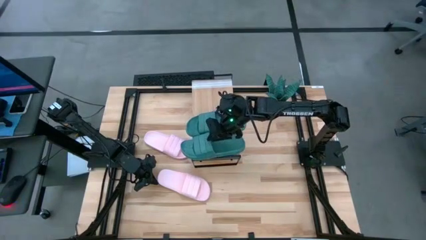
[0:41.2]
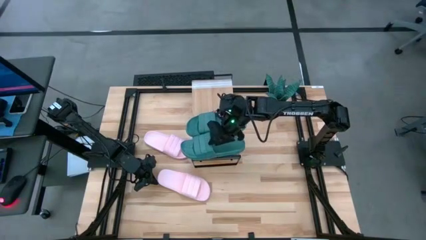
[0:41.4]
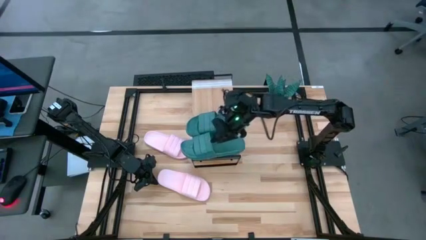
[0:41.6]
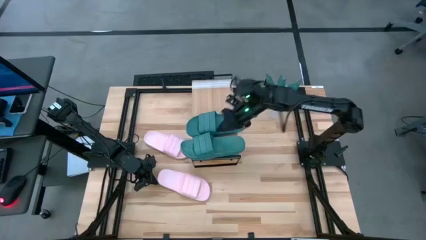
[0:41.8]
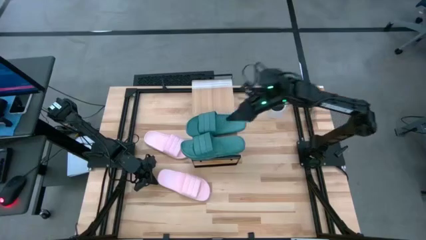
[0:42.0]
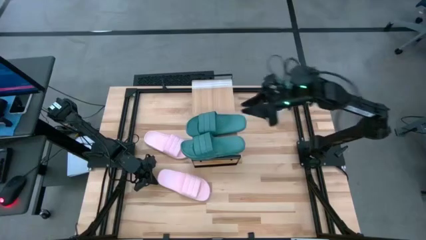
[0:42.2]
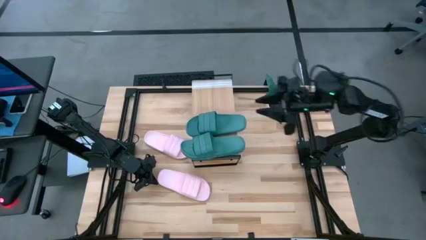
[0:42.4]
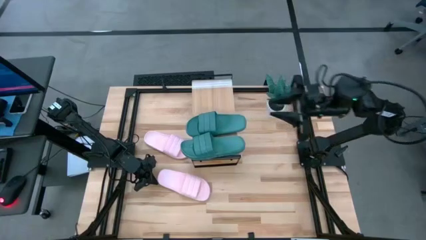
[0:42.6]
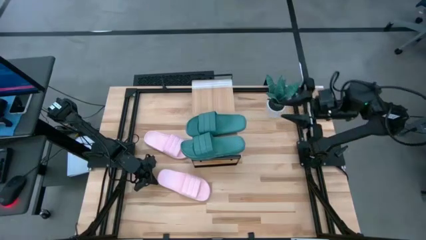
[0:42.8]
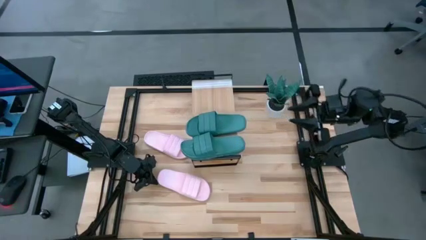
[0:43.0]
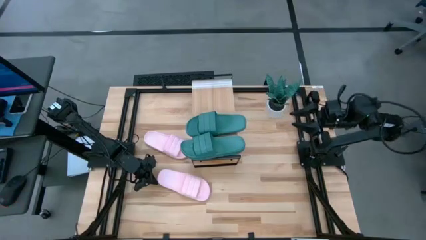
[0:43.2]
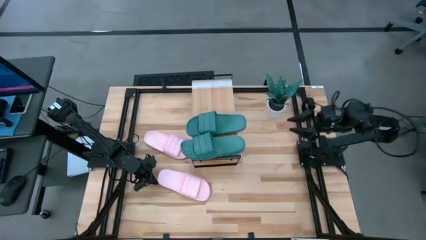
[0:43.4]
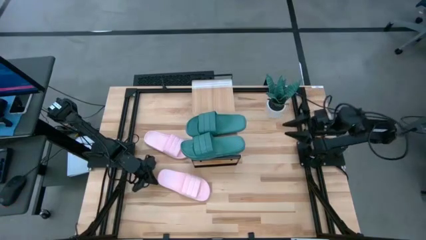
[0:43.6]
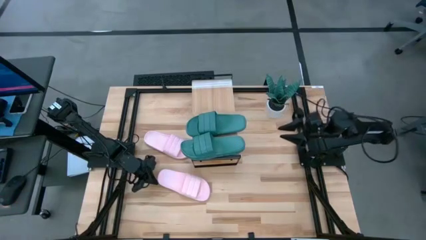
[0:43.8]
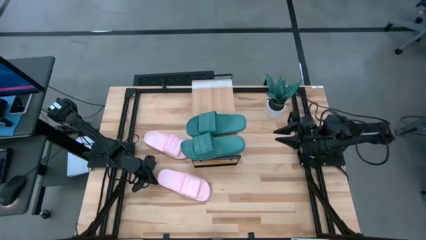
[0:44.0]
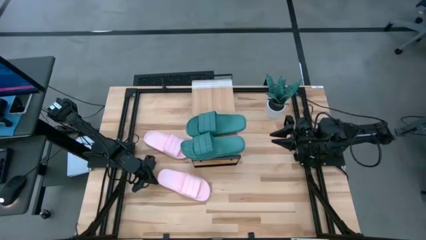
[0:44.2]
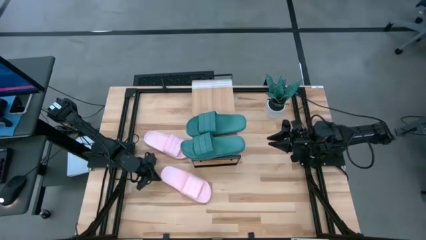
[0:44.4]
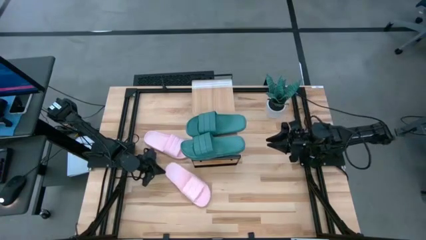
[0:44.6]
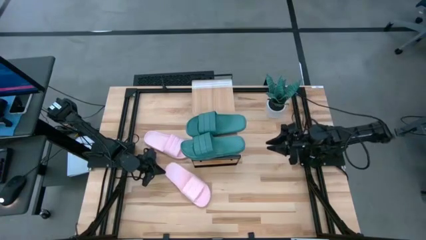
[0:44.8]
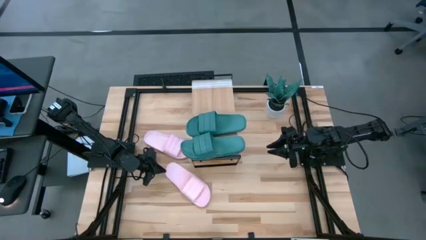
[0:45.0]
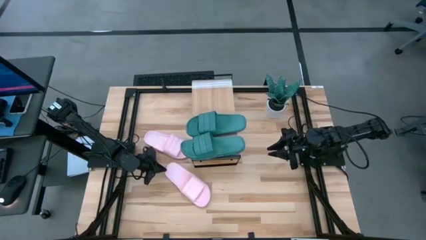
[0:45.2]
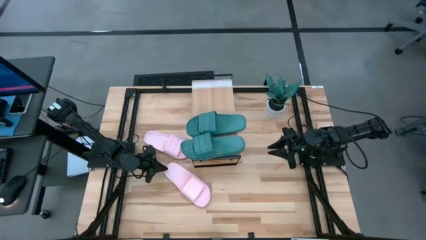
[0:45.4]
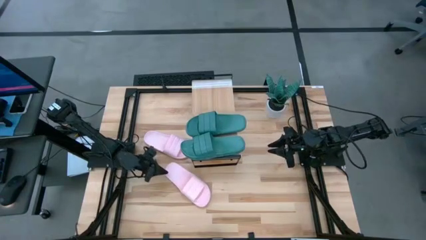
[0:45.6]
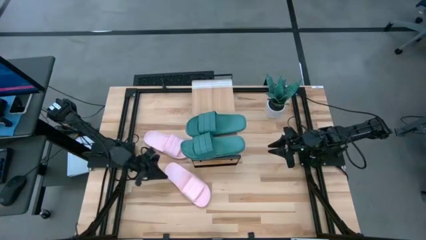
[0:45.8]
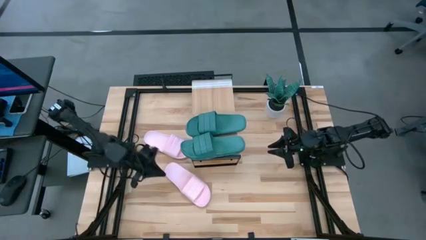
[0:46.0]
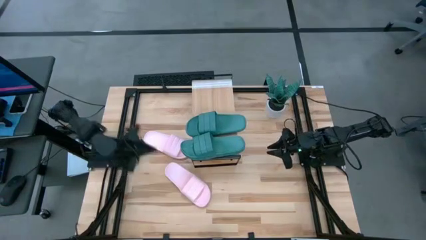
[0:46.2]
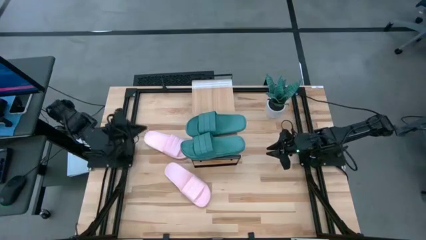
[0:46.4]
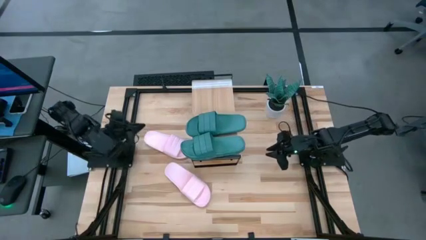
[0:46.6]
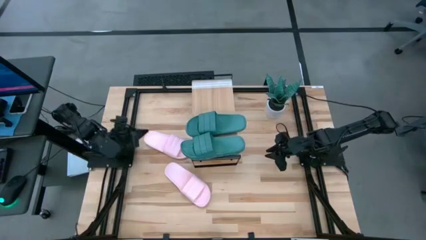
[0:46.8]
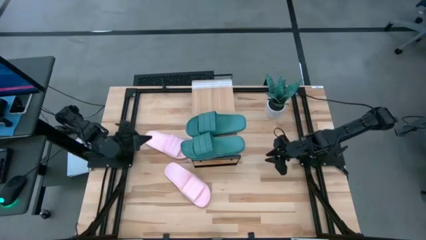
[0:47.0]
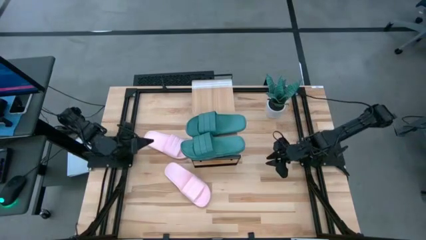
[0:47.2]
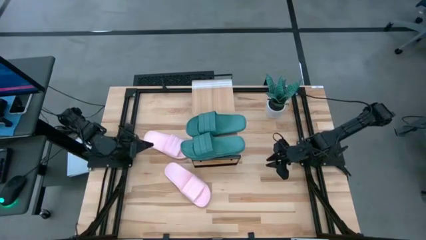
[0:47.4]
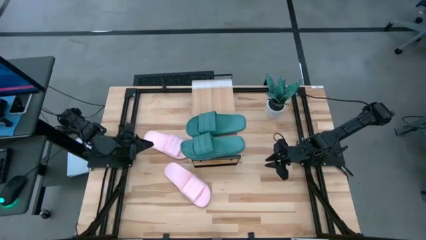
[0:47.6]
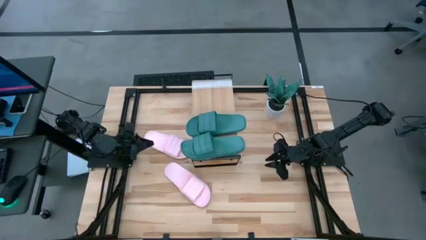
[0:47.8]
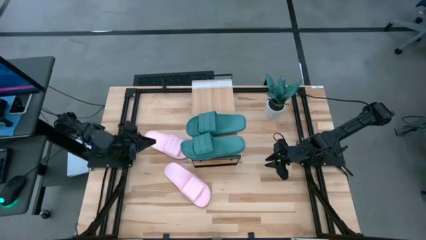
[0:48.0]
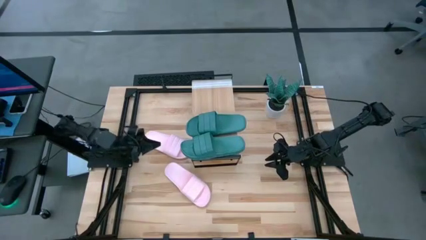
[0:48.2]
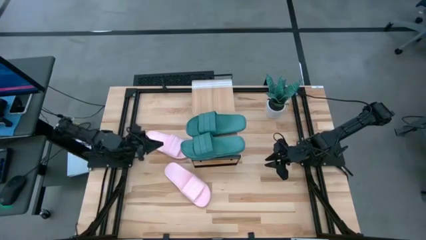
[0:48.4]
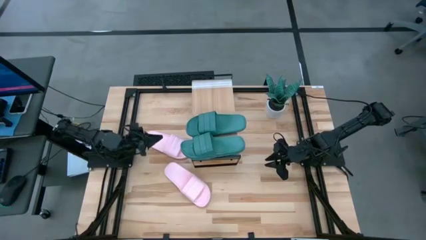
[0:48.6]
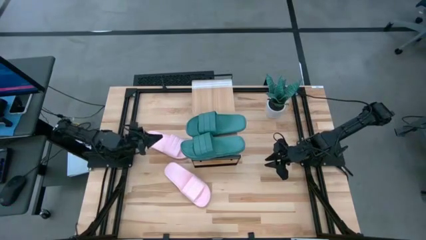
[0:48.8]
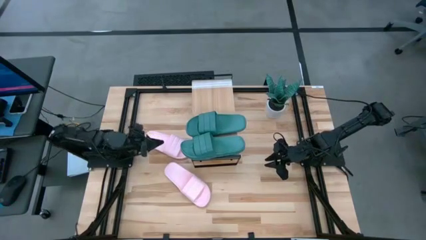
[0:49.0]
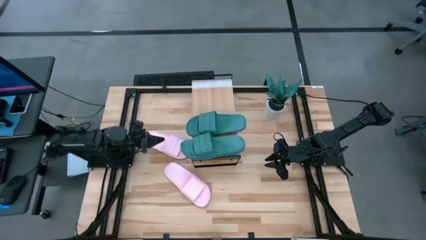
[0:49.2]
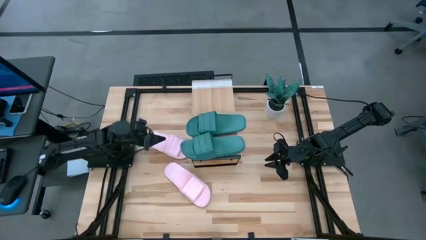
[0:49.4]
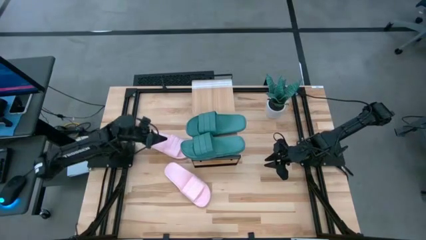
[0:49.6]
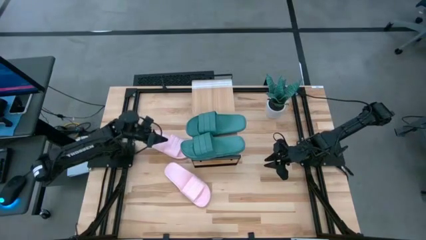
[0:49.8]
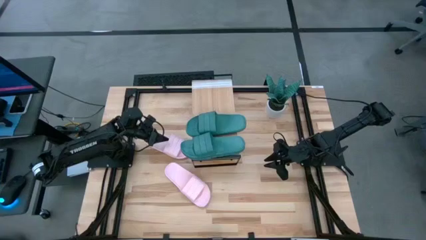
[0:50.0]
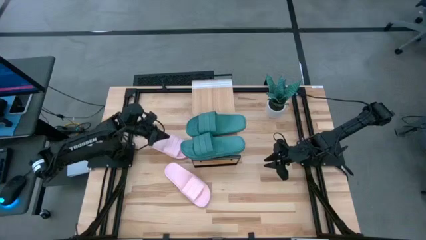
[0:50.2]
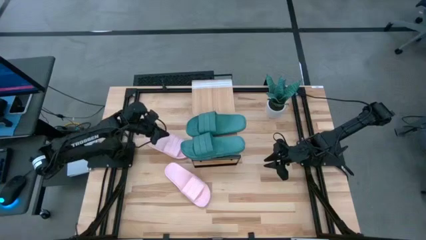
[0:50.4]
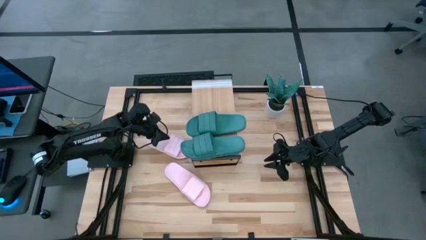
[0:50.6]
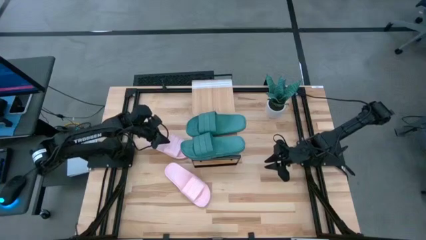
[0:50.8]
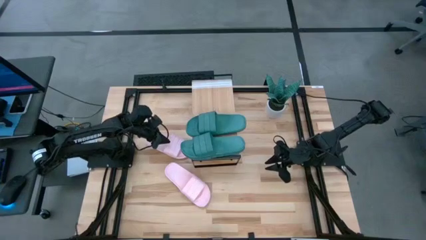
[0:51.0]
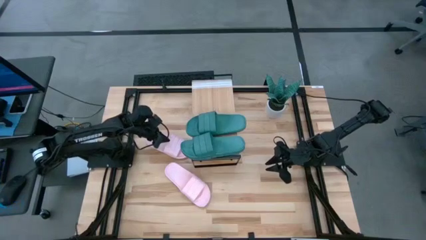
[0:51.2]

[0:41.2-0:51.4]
Task: Pick and place slides into the shelf
Put the top pink slide on the shelf
